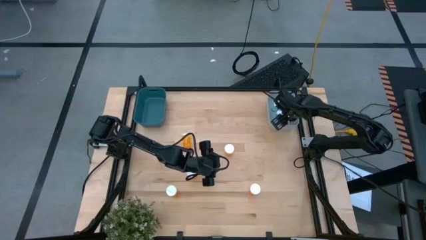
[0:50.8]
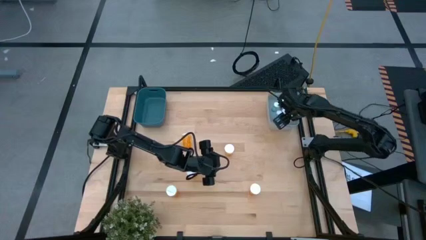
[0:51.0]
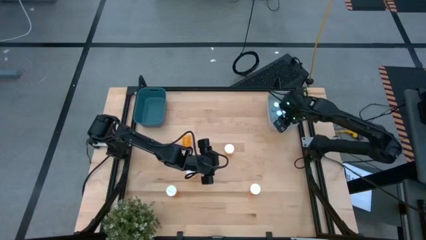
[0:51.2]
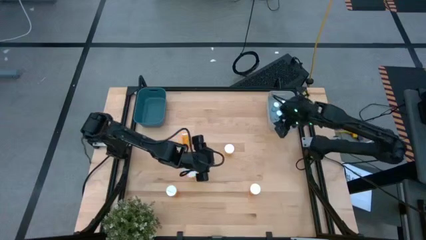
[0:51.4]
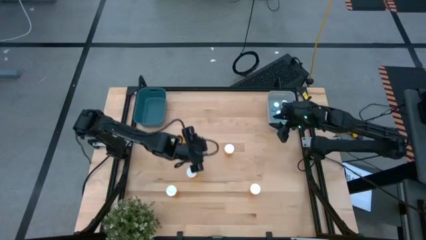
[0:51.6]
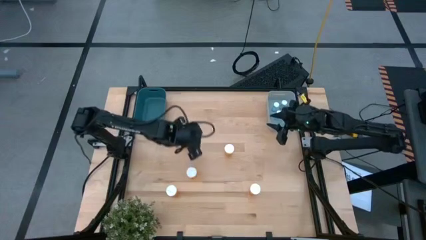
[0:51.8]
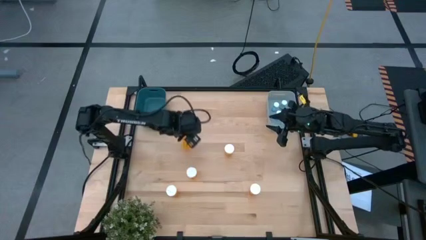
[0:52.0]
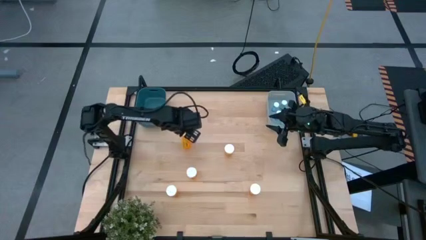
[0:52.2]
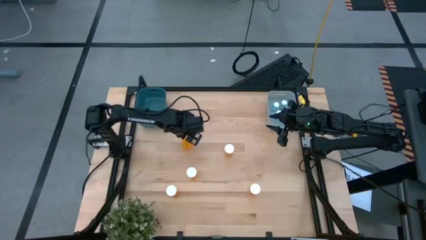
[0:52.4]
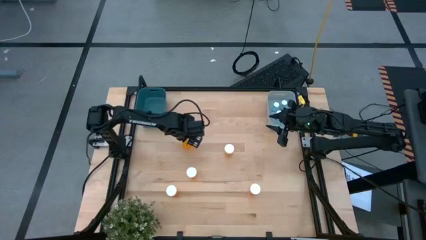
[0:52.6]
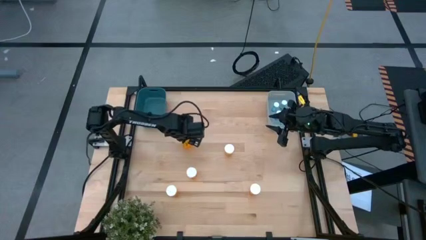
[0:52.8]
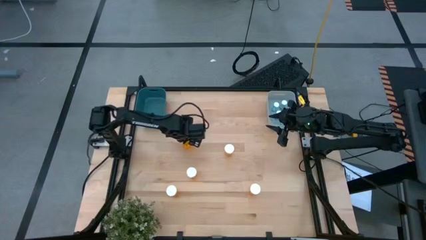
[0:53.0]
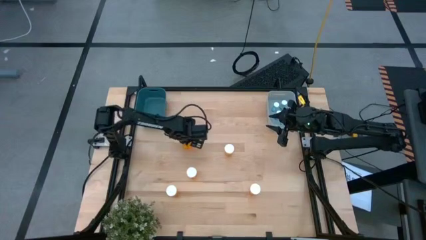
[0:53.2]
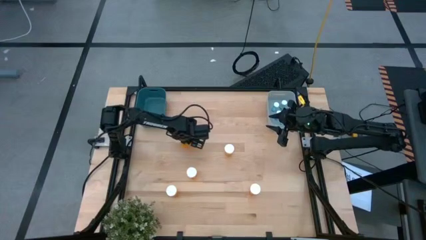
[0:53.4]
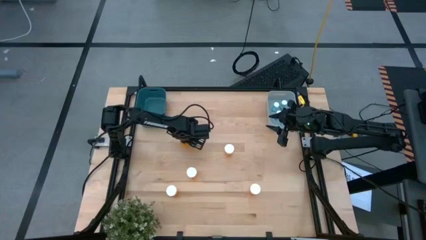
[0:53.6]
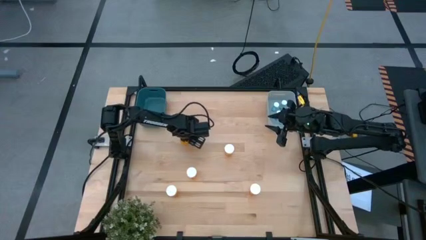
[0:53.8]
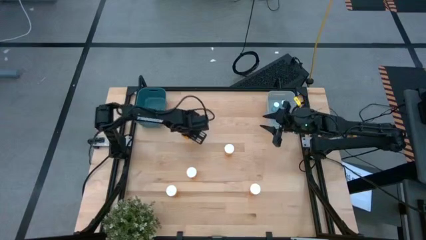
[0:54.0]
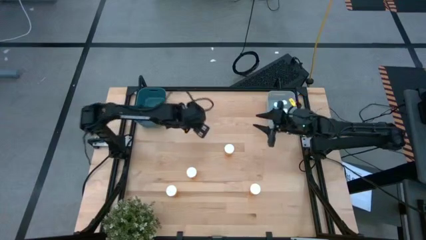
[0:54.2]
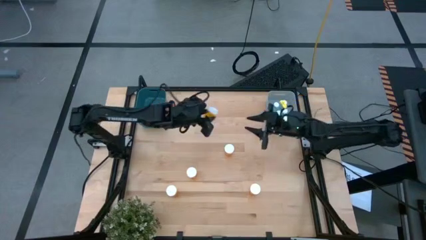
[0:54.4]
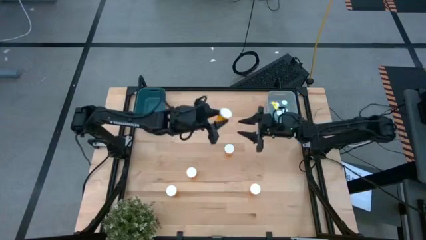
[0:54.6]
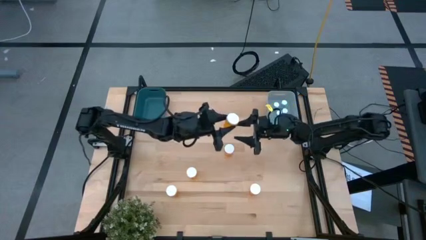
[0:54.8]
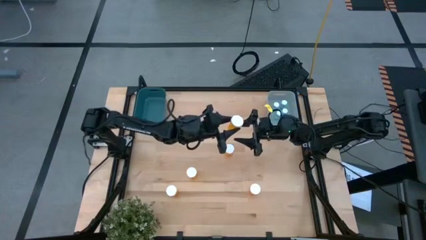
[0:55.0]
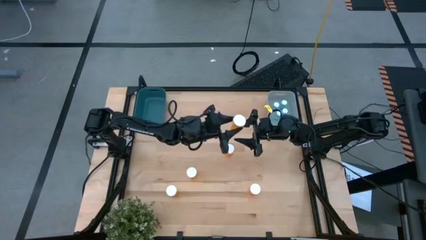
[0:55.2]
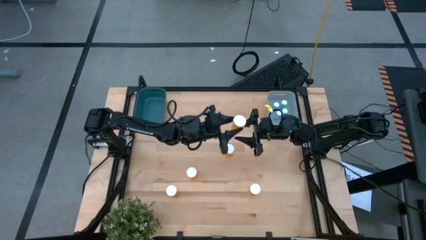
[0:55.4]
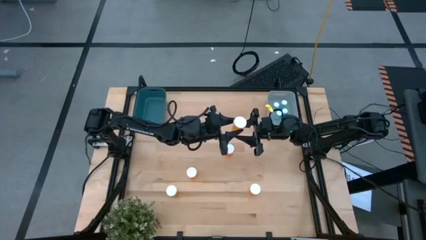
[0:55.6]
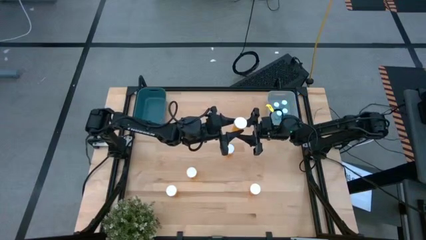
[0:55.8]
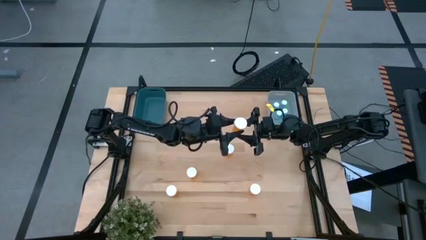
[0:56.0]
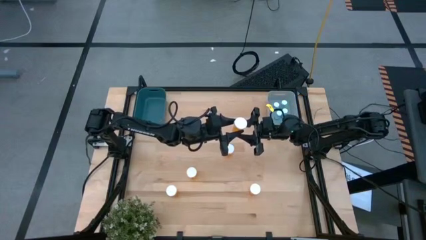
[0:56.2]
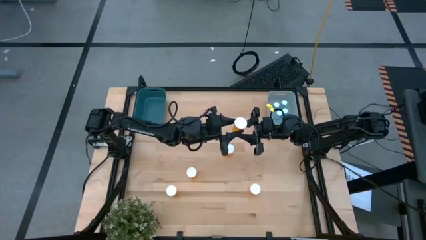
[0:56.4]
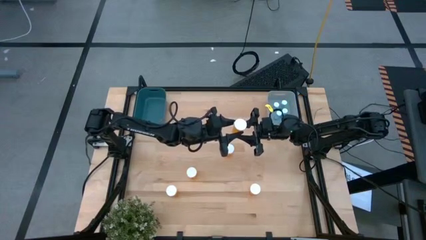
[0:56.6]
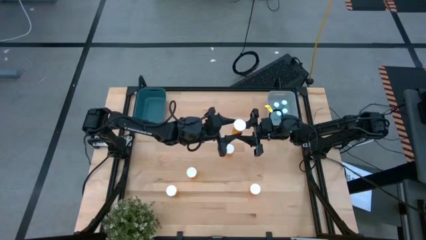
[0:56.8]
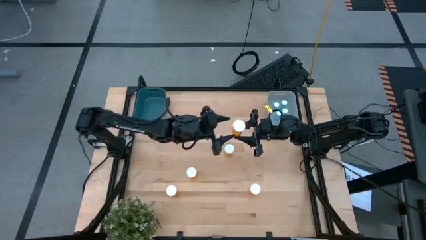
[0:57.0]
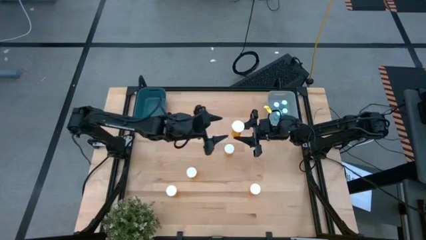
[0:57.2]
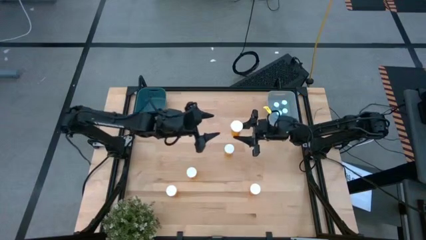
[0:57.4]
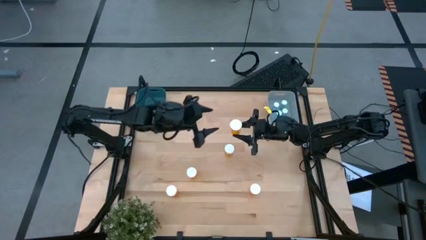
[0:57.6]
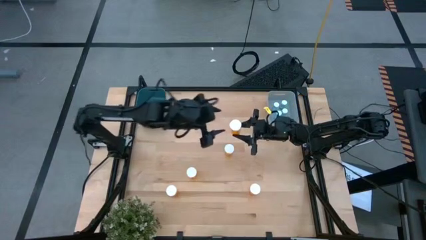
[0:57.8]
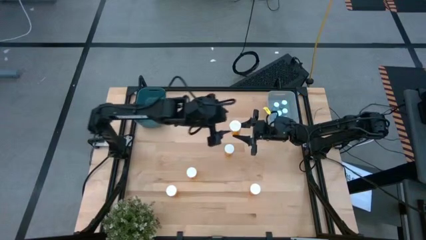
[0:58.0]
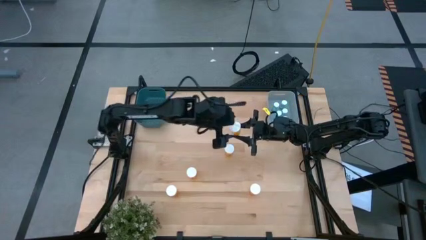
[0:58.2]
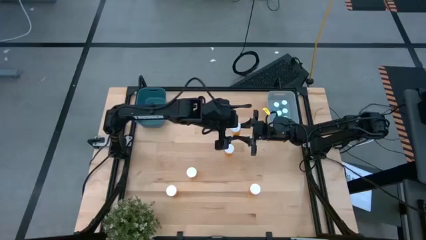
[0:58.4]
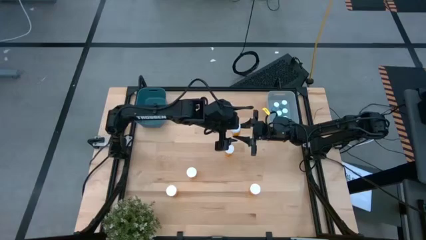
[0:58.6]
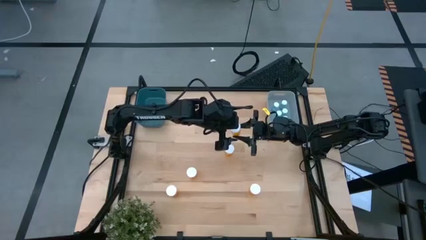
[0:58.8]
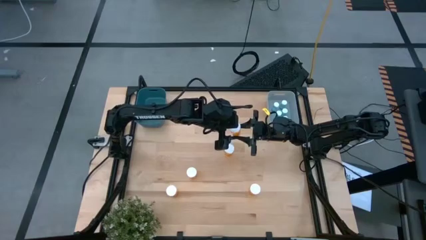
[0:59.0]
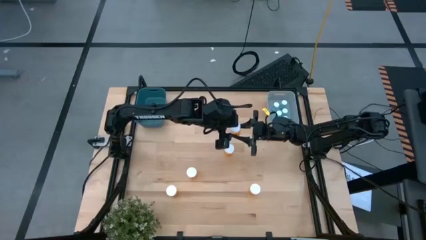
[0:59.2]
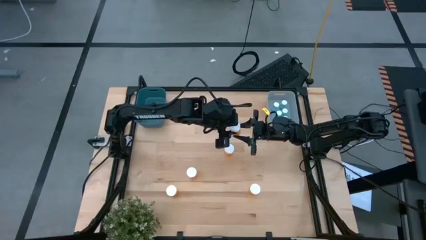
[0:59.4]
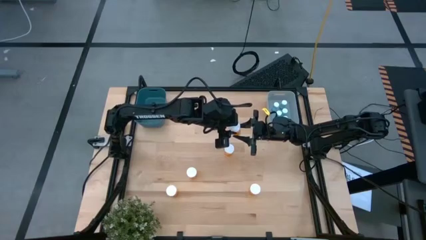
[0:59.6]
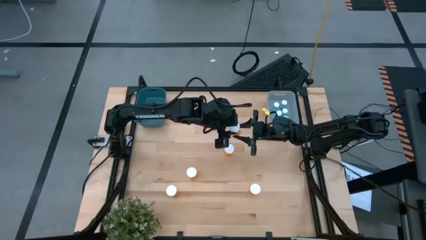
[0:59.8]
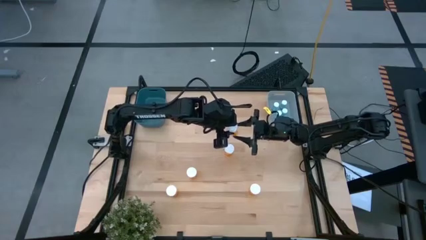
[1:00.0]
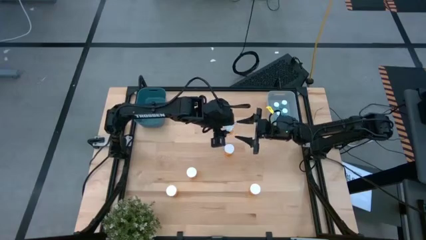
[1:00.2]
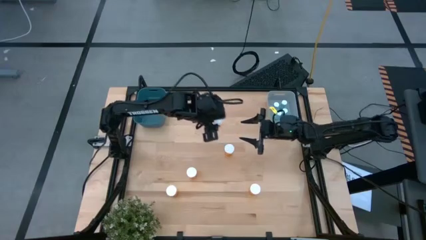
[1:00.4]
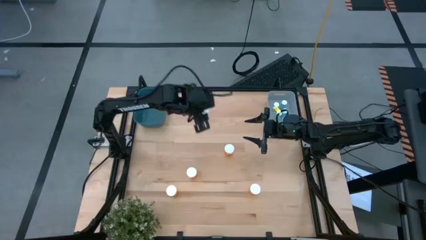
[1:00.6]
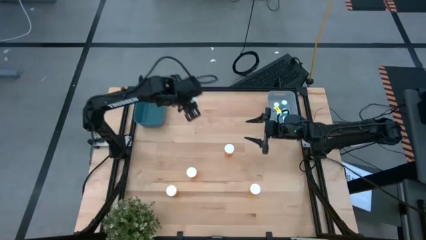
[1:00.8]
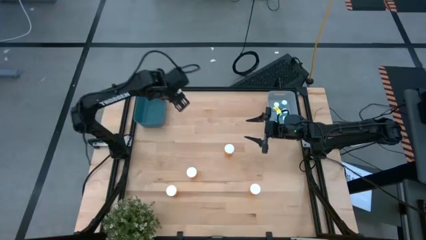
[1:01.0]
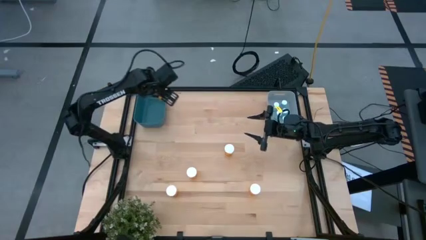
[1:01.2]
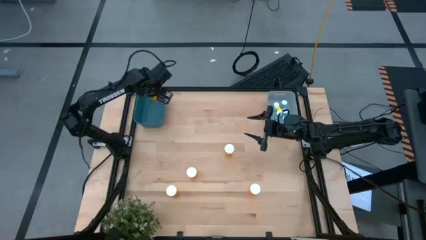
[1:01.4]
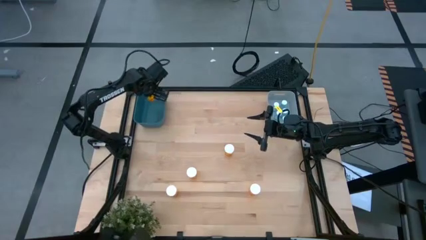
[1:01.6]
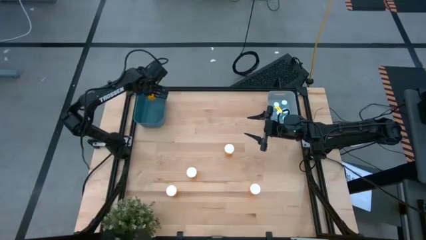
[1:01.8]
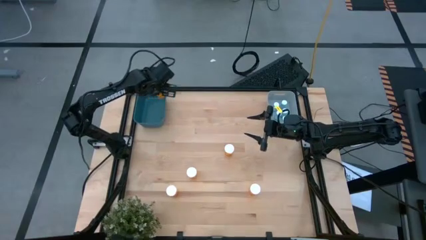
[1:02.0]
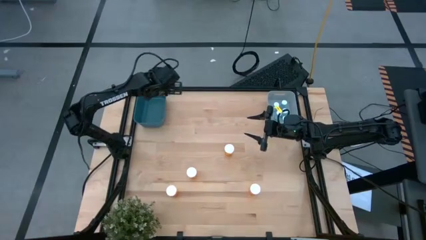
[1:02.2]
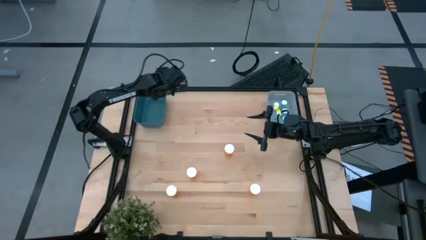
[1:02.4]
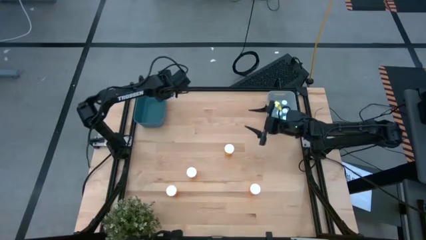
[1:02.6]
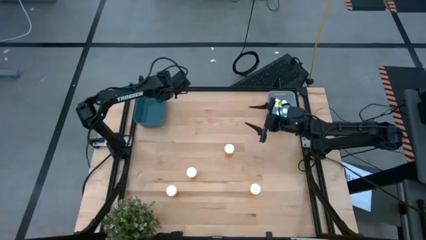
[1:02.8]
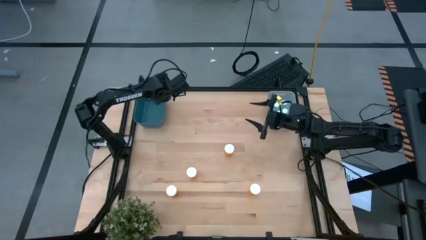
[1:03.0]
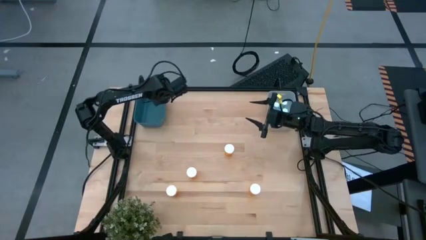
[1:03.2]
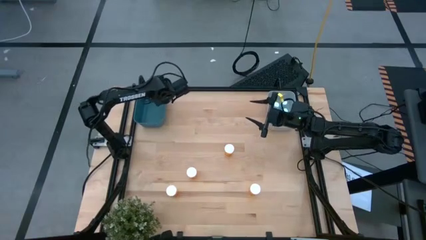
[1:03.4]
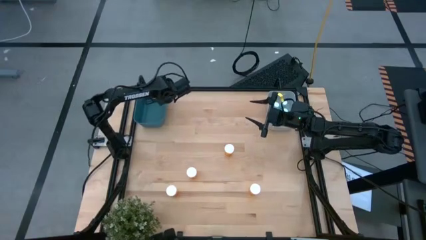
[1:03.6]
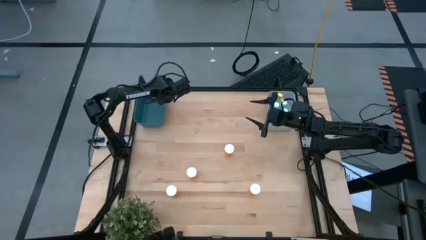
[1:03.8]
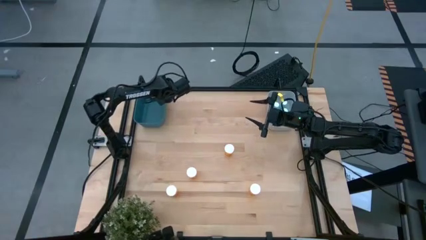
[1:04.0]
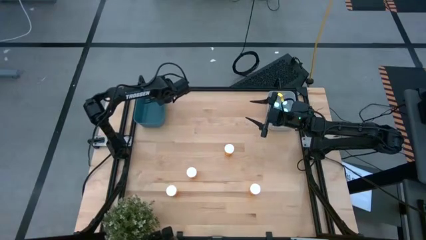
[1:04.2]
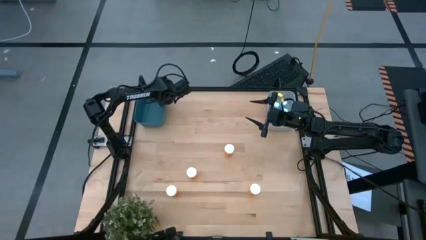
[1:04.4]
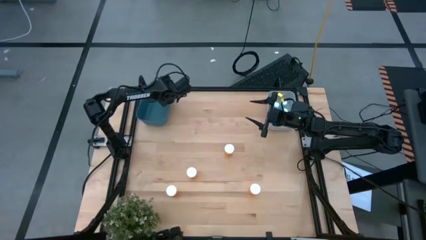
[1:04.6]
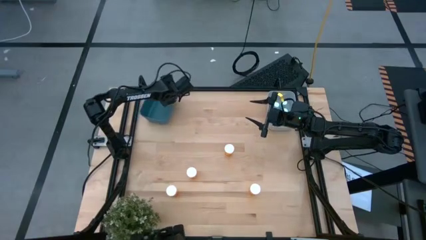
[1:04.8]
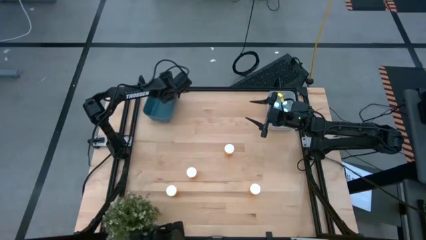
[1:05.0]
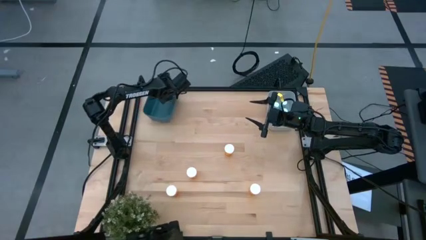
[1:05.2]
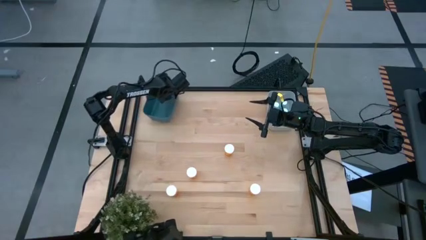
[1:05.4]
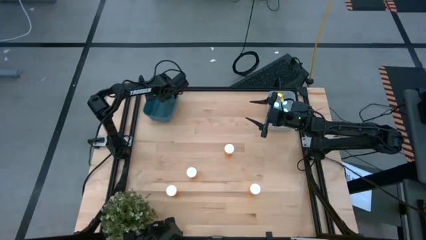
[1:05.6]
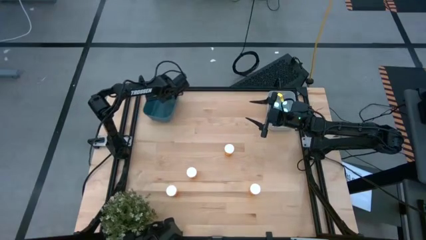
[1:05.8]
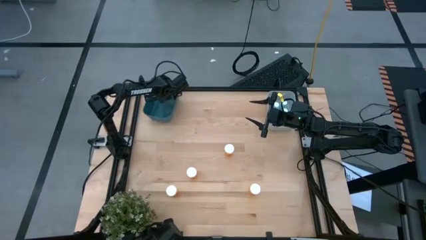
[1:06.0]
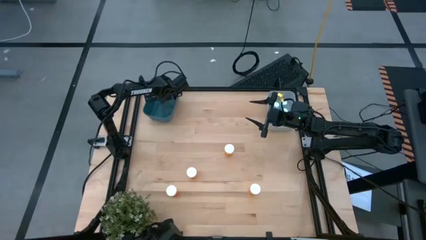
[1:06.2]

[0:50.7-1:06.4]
Task: Pick and place medicine bottles into bin by pill shape (circle, oval)
Put the orange capsule bottle into the blue bin

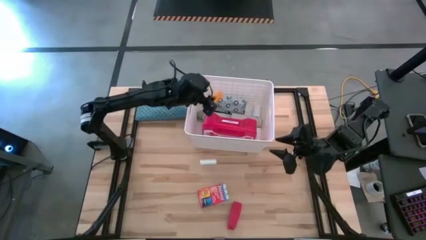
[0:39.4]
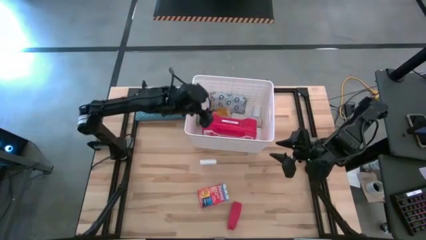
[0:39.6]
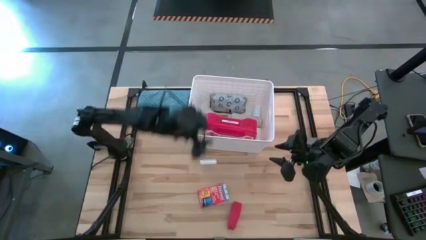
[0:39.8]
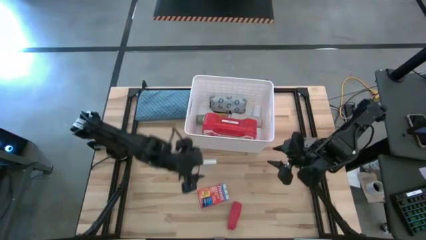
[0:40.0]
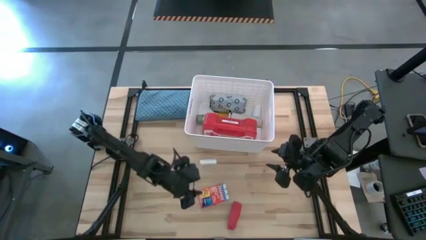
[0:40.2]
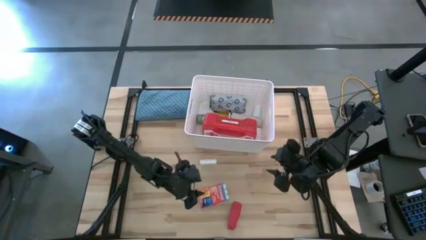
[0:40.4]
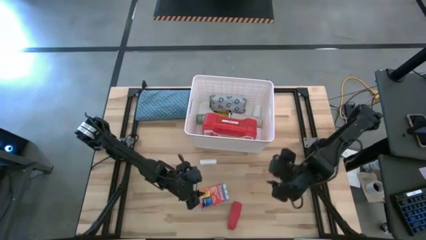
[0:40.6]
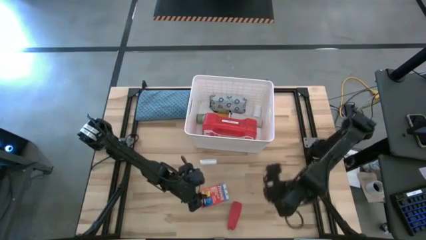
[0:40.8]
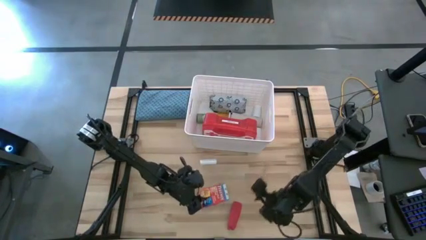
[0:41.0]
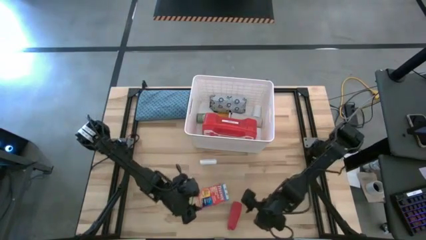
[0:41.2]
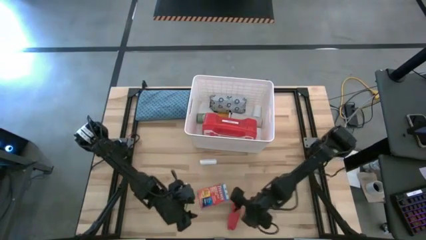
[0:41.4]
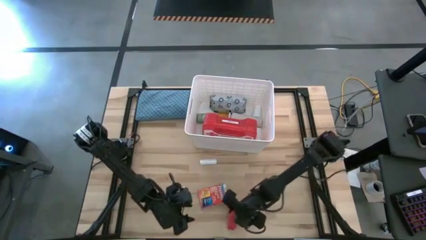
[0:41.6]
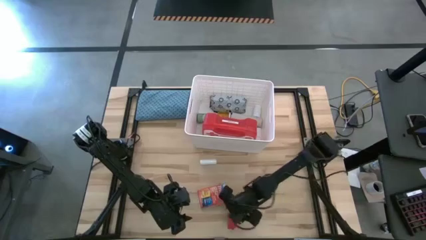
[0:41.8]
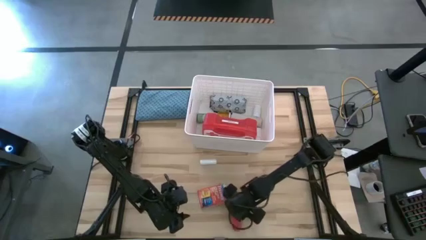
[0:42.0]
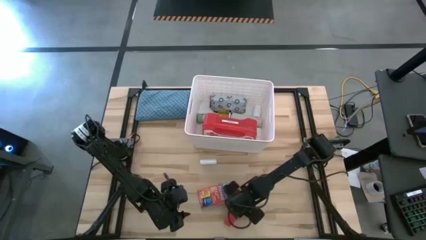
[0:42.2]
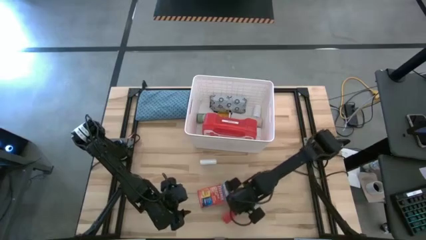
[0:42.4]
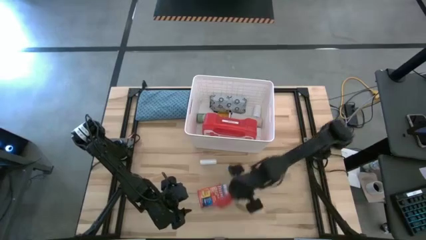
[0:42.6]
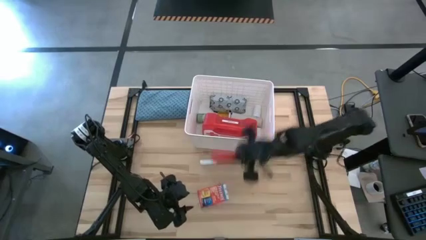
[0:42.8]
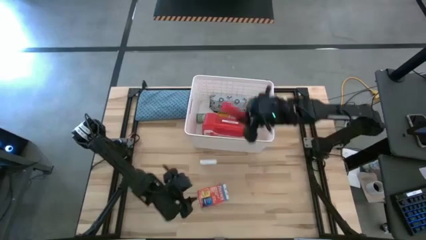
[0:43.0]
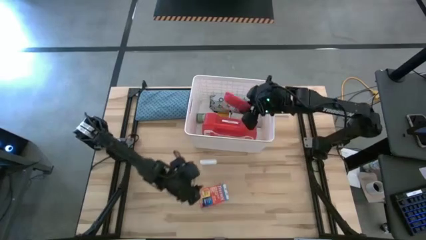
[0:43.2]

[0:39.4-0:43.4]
Task: Pick & place medical supplies in basket/bin
Put the red bandage into the white bin
